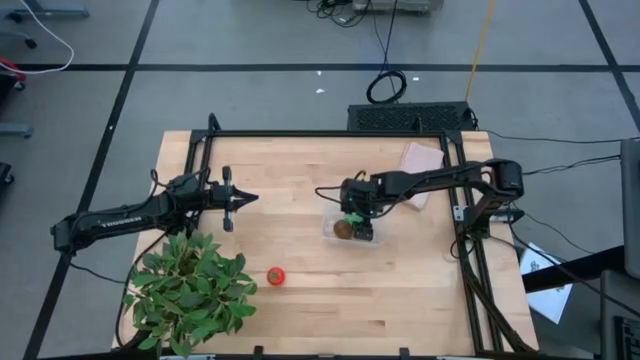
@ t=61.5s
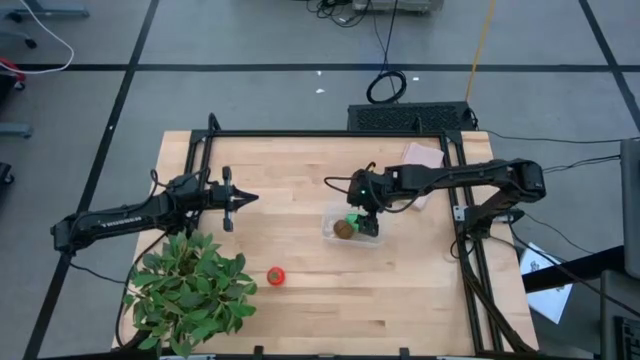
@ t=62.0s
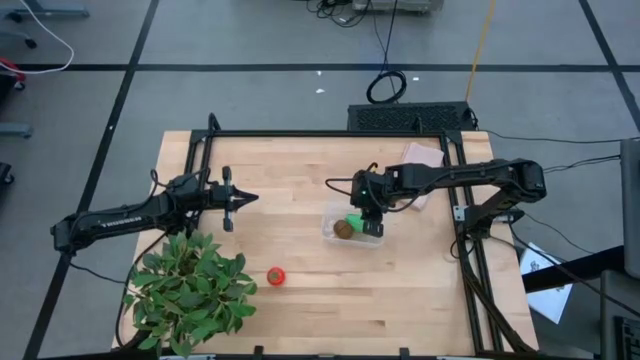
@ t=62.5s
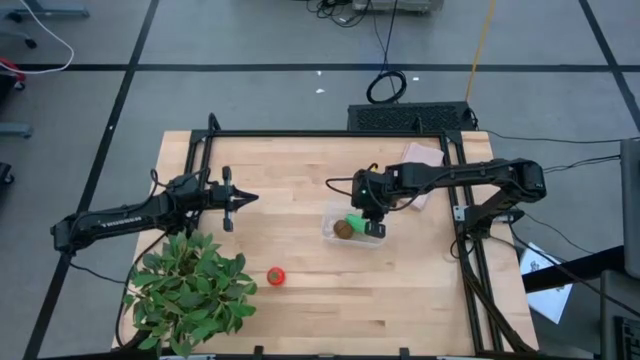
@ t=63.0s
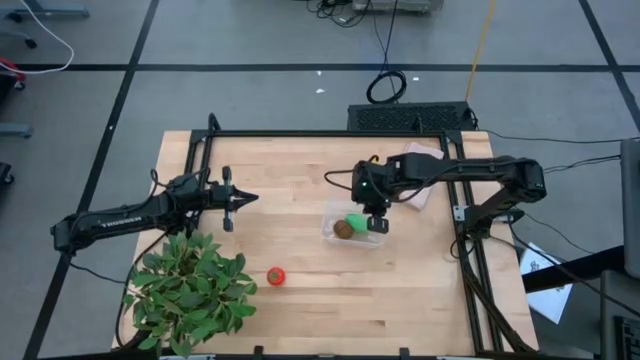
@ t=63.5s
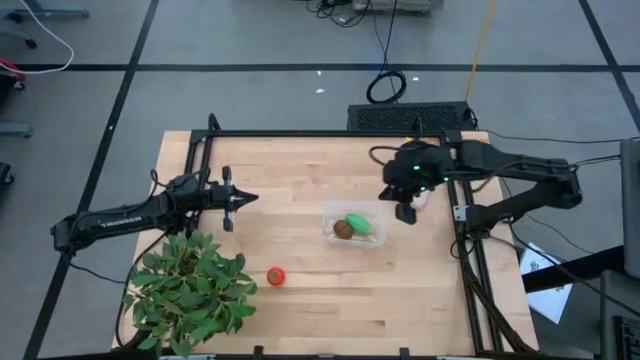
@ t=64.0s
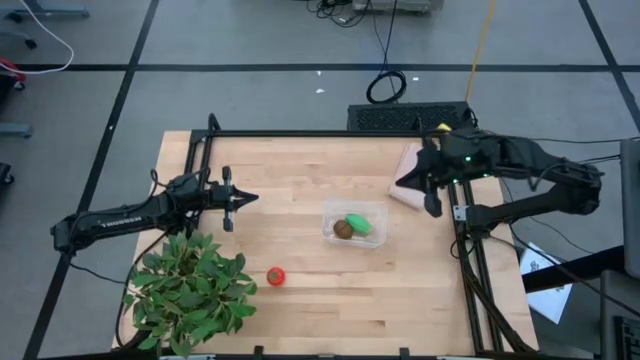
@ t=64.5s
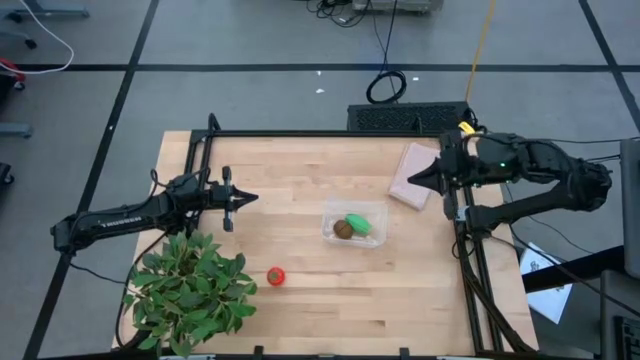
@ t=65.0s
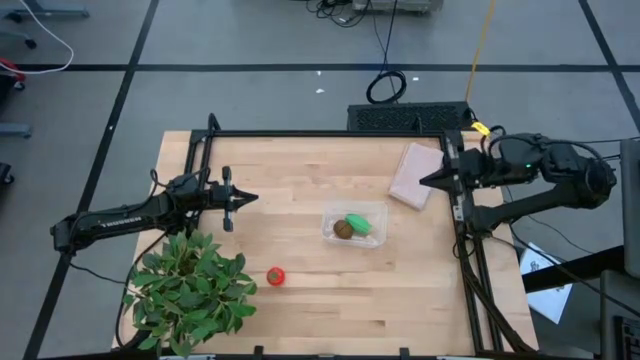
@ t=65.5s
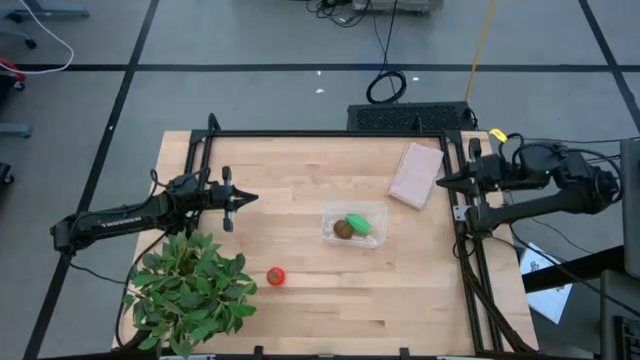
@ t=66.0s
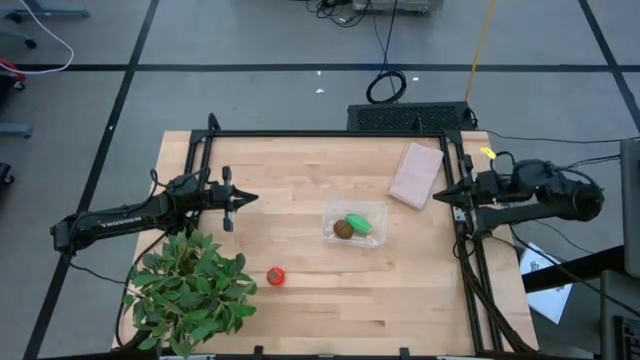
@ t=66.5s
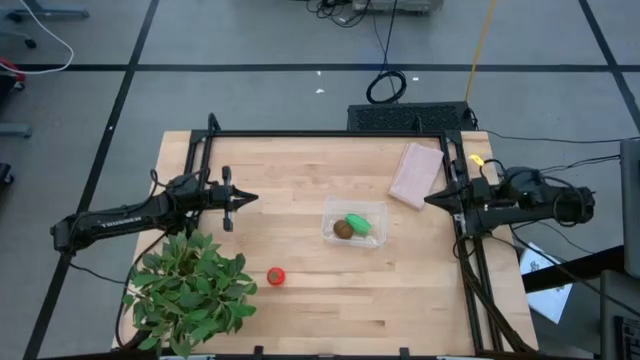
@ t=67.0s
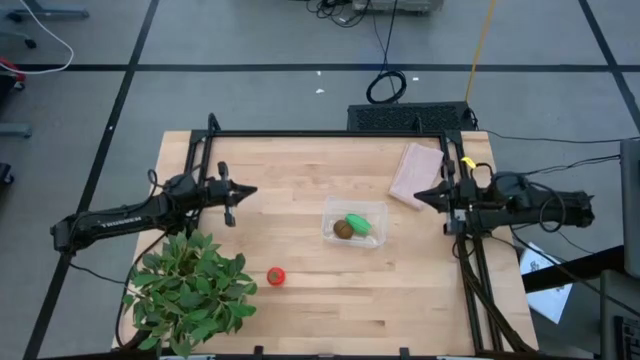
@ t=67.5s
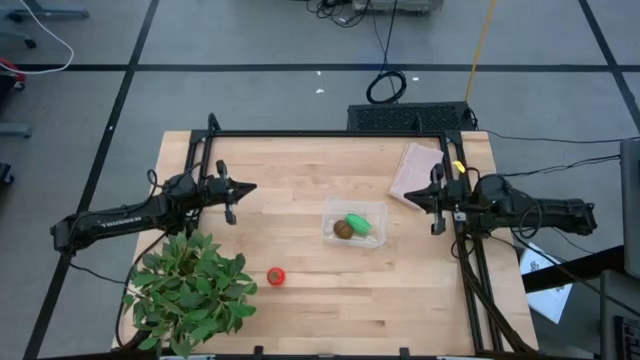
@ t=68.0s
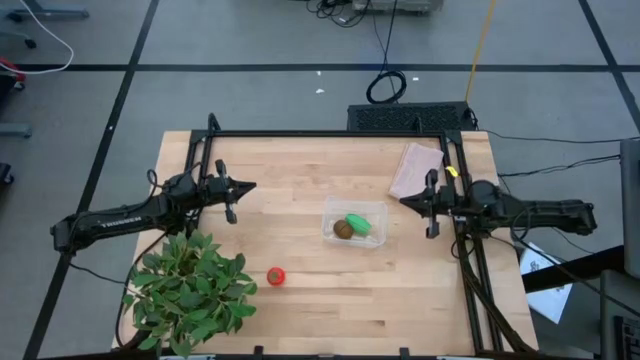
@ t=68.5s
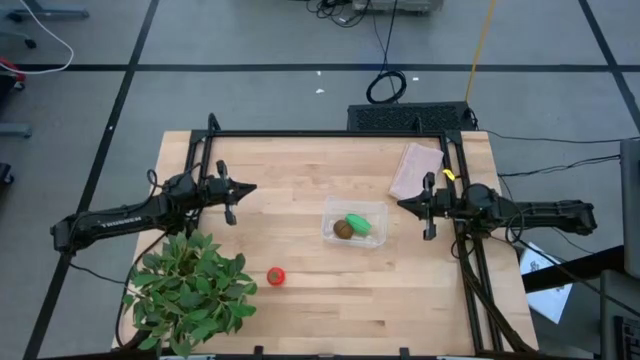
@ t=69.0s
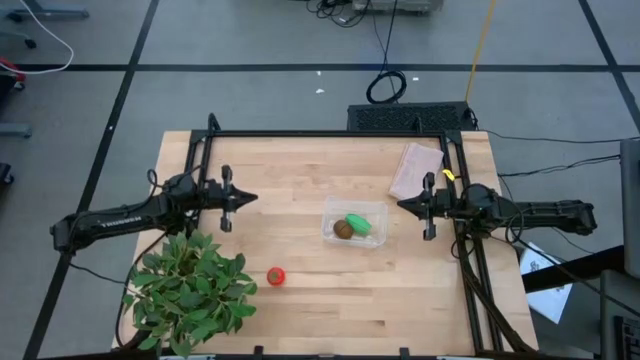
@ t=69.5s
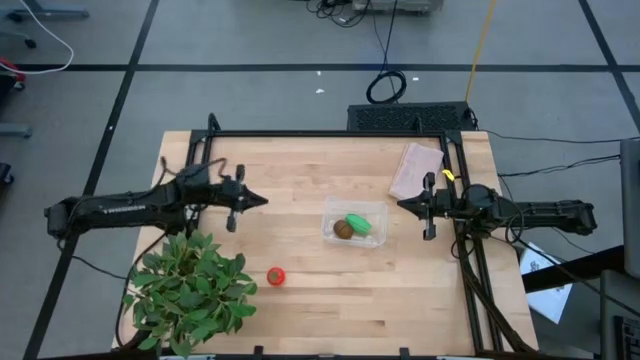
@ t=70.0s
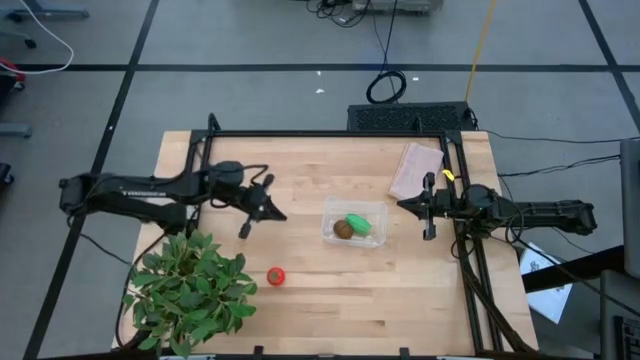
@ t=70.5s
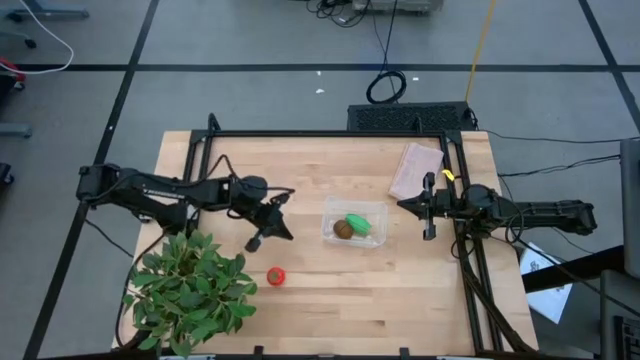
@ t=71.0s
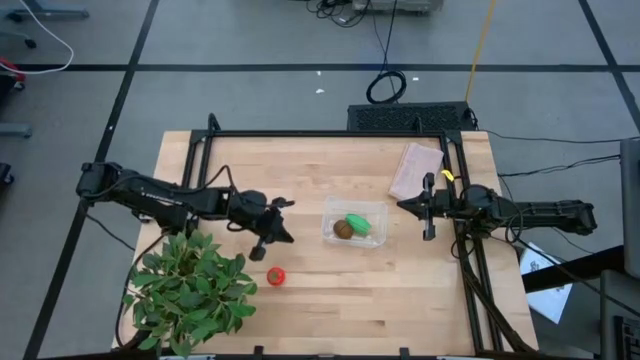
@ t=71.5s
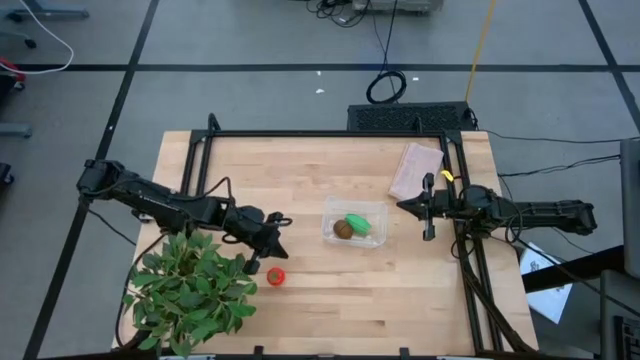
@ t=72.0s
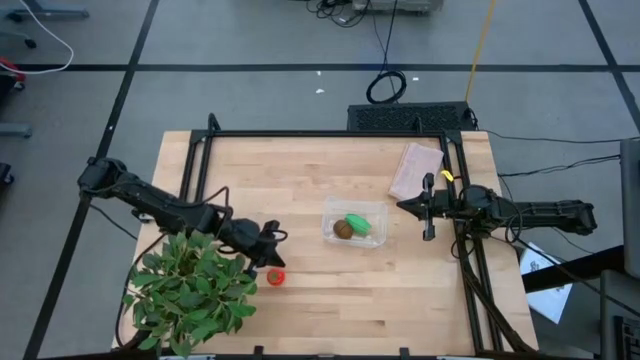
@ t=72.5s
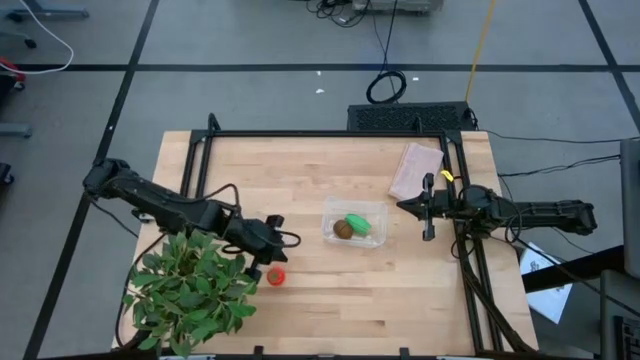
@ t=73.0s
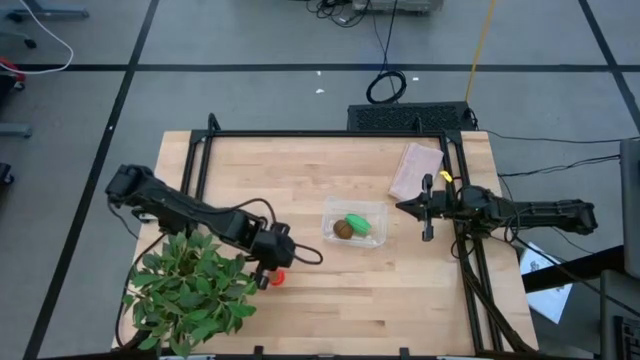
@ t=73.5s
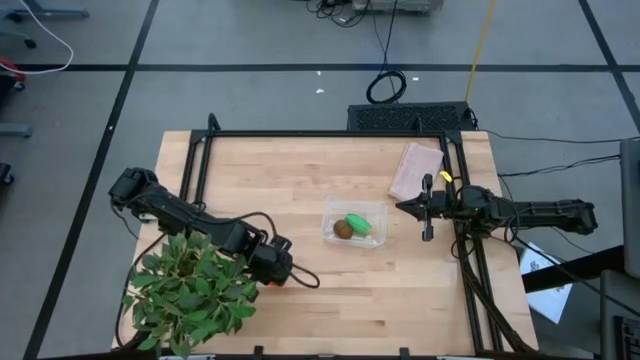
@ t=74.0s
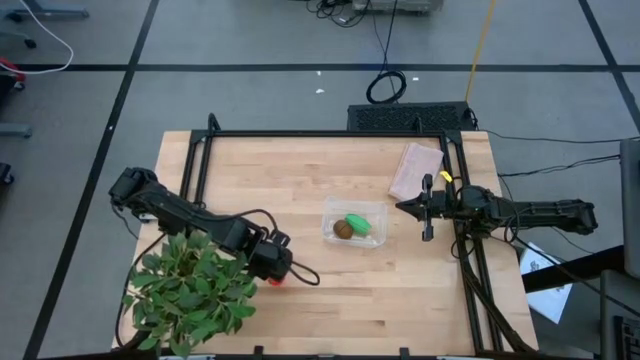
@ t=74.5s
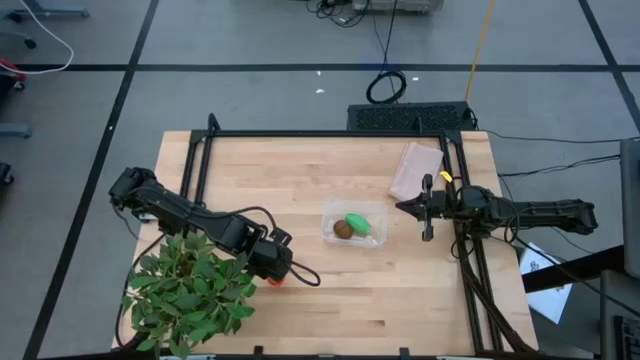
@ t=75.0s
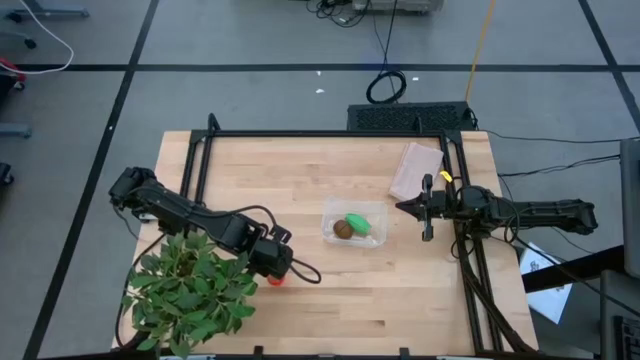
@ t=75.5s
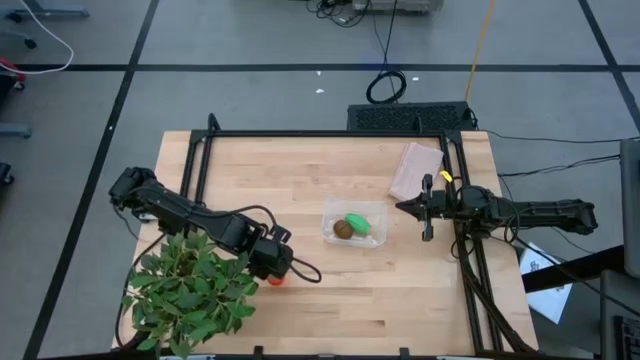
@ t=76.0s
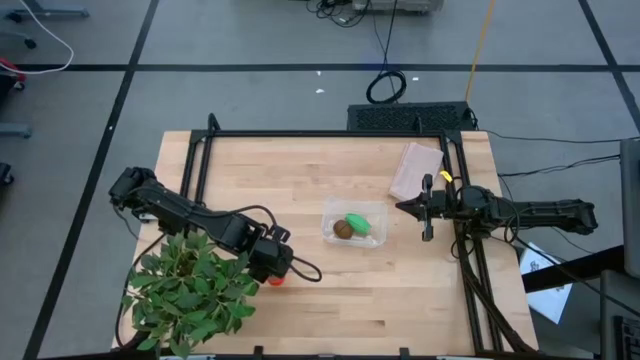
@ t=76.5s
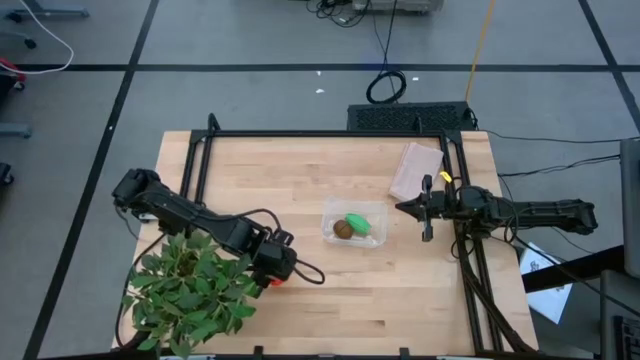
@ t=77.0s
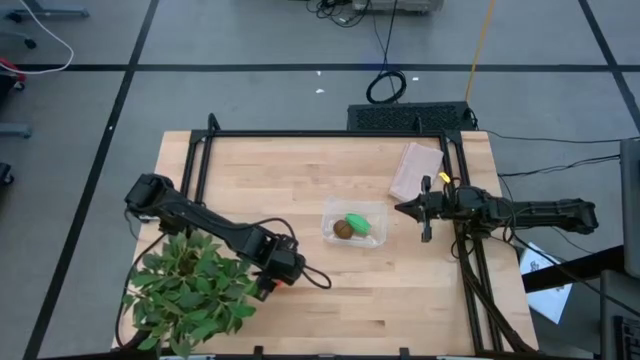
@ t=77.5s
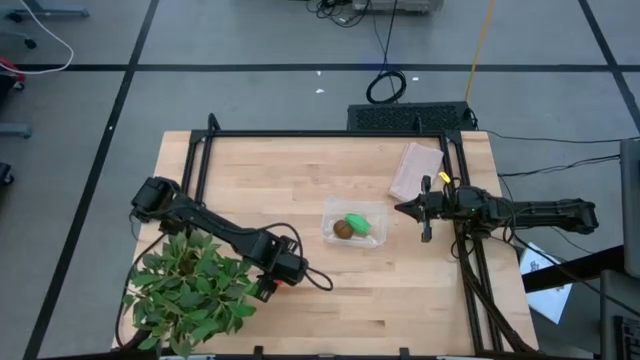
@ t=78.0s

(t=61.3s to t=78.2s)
Task: Pick and placing Produce into tupperware
Put the red tomato into the transparent bin
